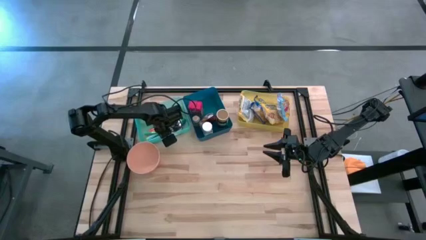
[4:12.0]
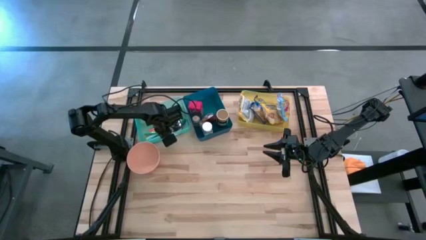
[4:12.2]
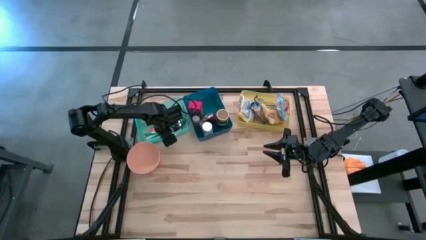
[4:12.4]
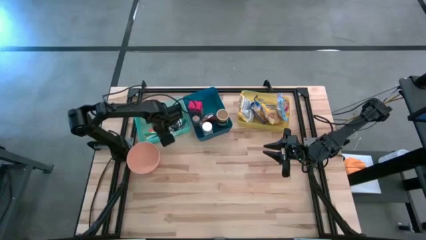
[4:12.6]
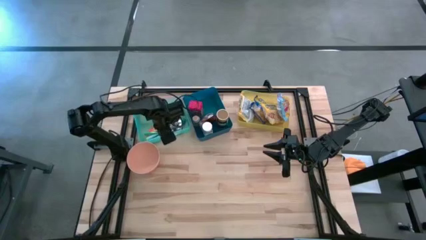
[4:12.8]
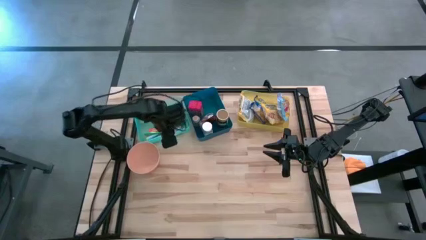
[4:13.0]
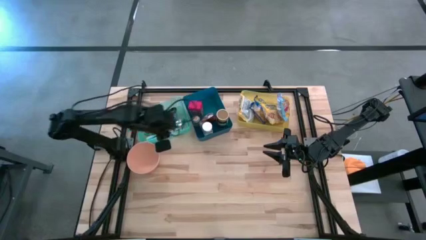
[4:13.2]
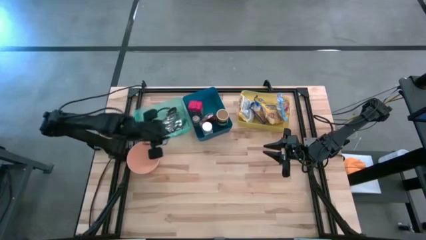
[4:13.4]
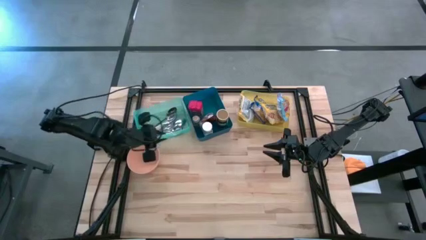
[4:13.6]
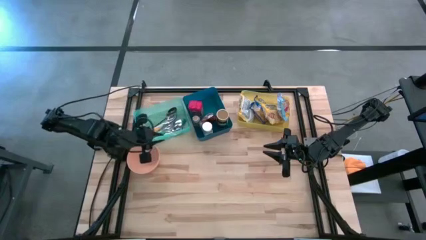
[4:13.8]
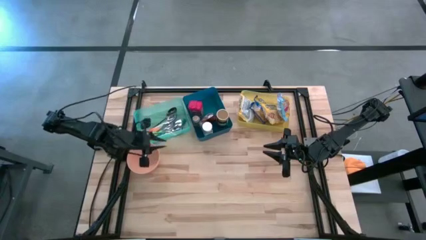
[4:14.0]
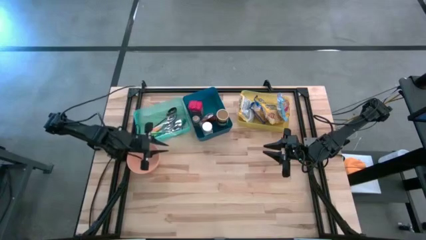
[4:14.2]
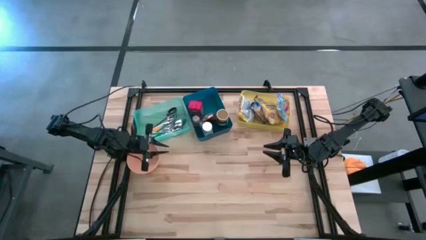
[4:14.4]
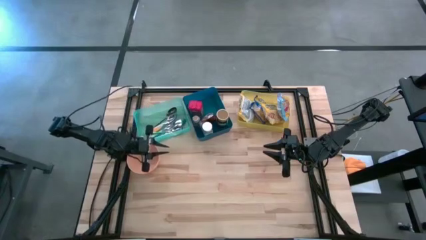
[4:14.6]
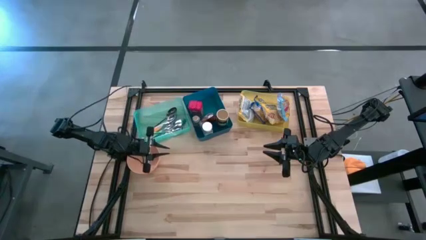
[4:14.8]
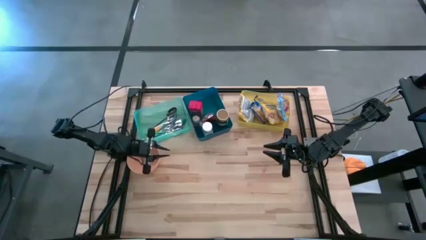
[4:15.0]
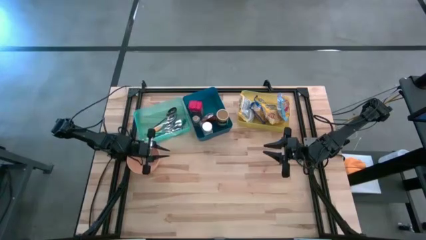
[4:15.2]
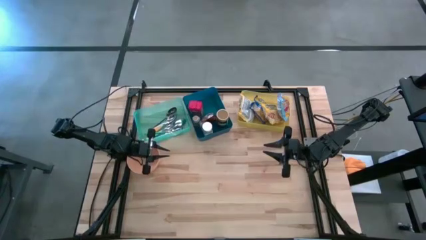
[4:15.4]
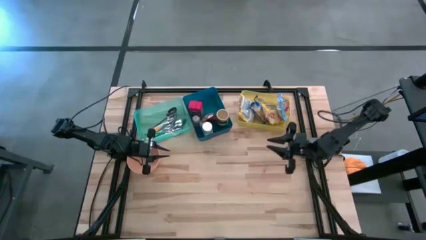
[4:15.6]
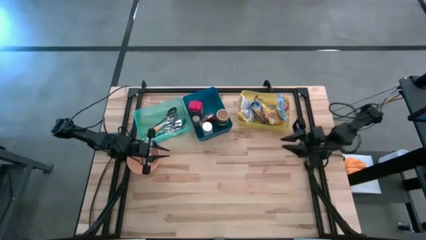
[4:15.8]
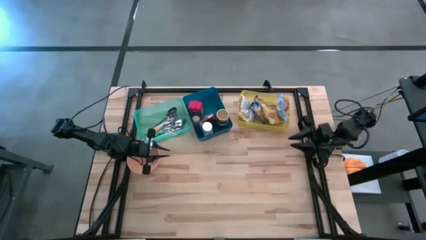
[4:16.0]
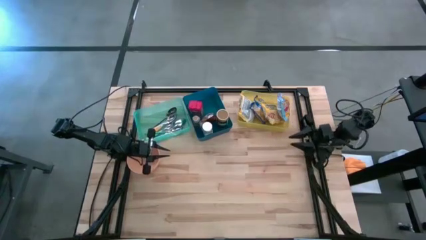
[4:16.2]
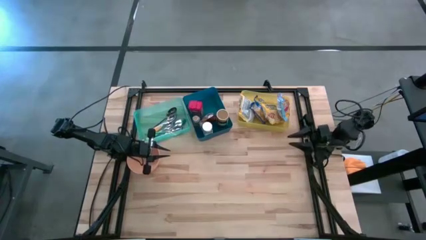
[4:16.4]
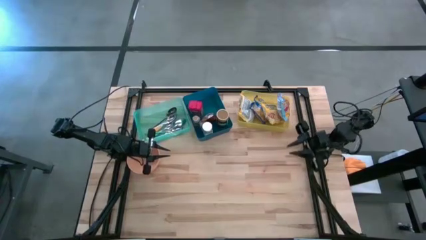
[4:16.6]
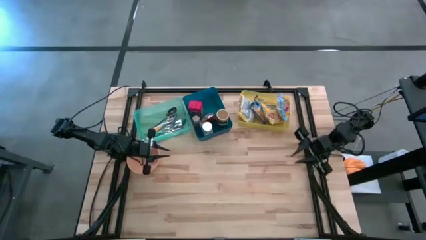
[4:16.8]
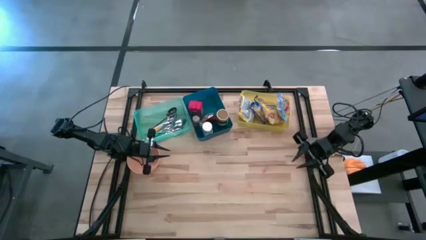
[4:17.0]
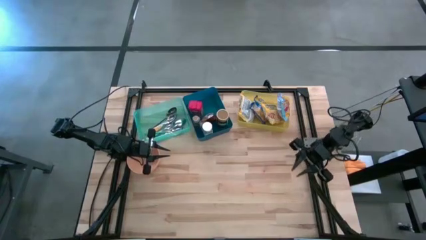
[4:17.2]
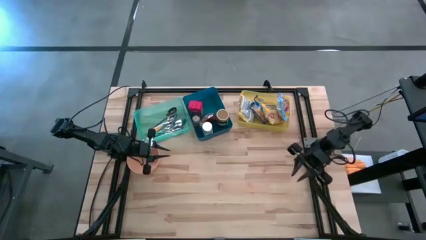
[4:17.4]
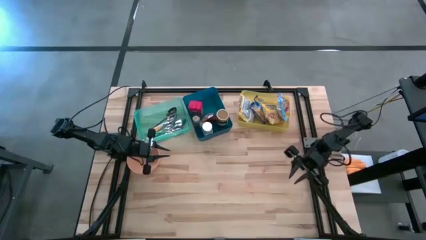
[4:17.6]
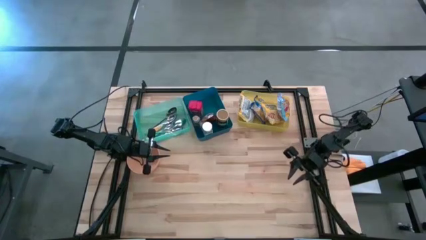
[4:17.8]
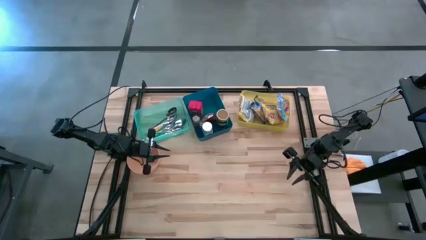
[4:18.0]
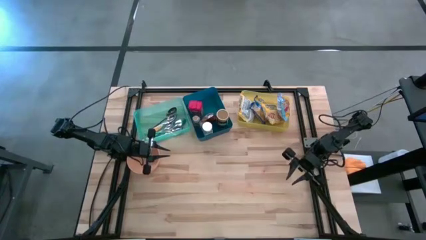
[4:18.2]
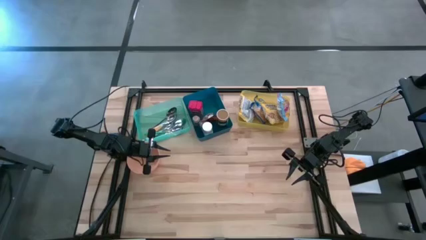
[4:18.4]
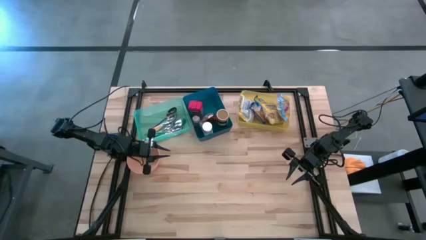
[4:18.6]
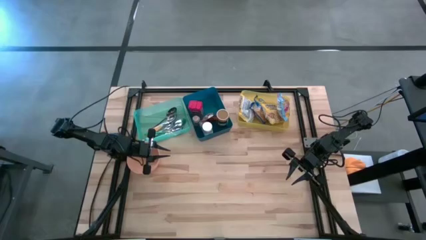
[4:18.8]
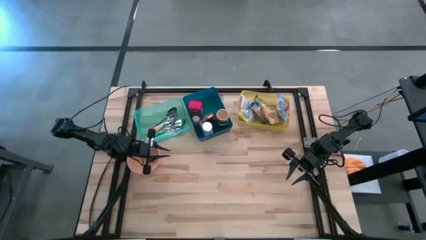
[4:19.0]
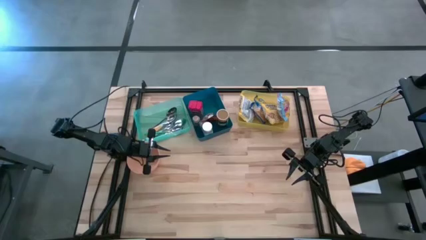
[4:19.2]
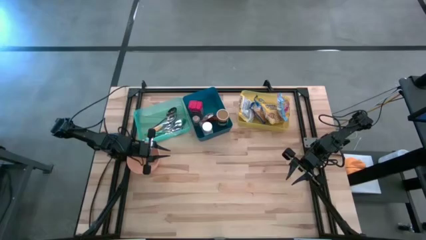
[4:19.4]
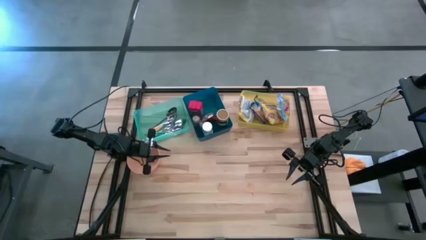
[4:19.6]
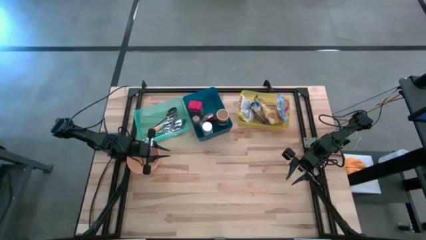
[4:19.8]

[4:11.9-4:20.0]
Return To Home Position
